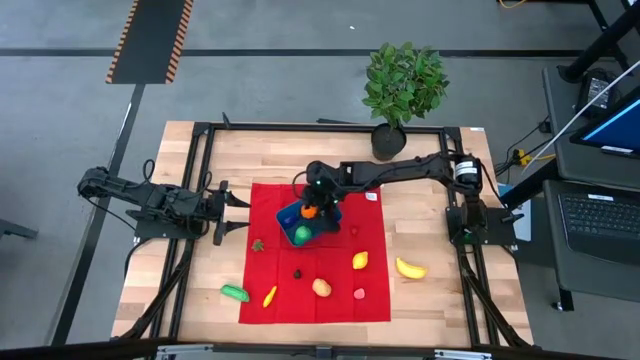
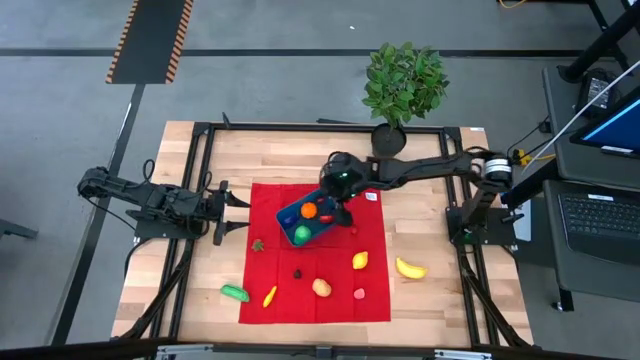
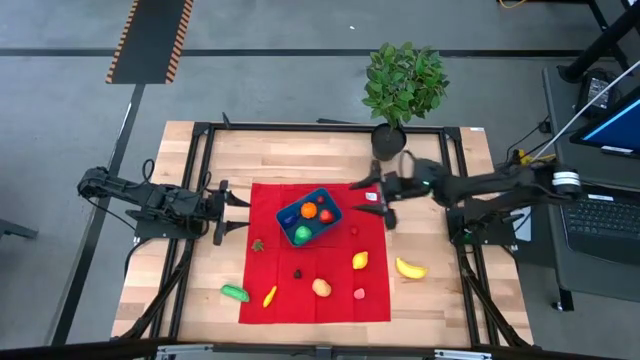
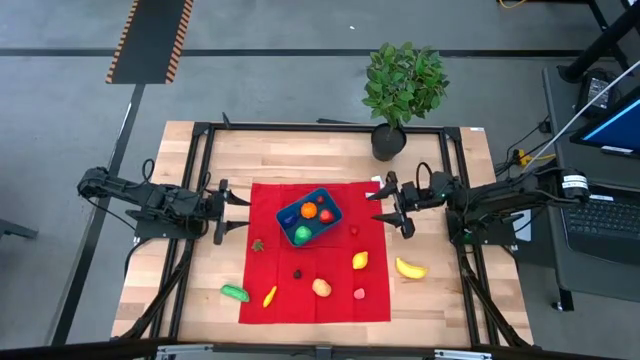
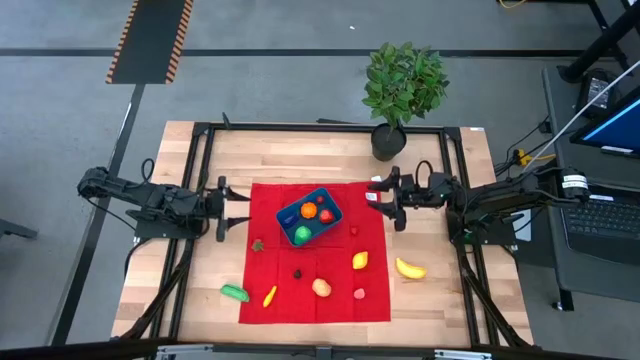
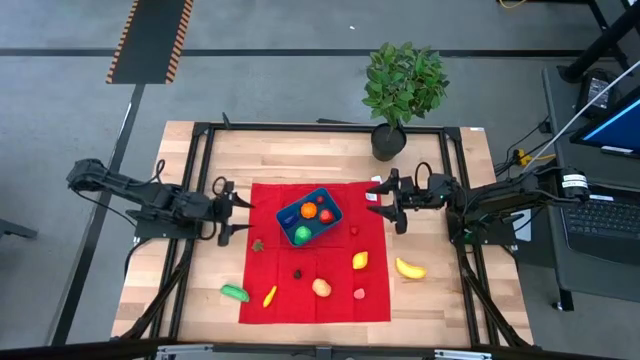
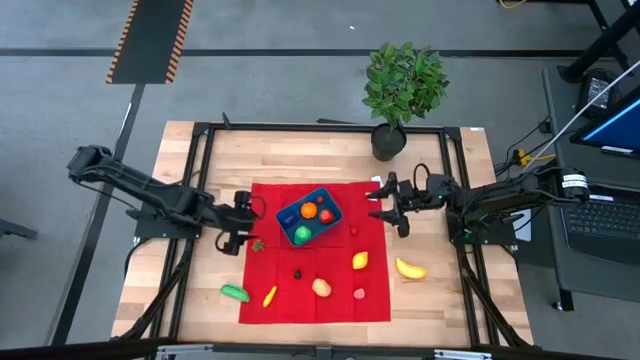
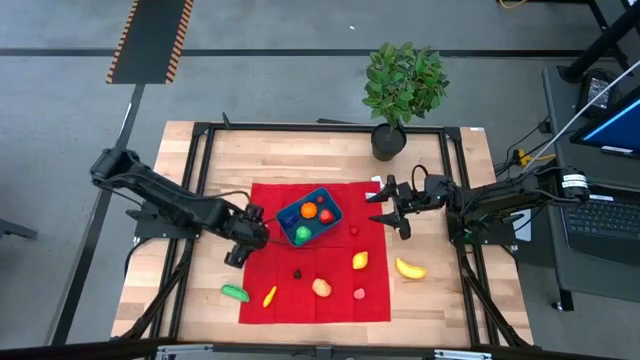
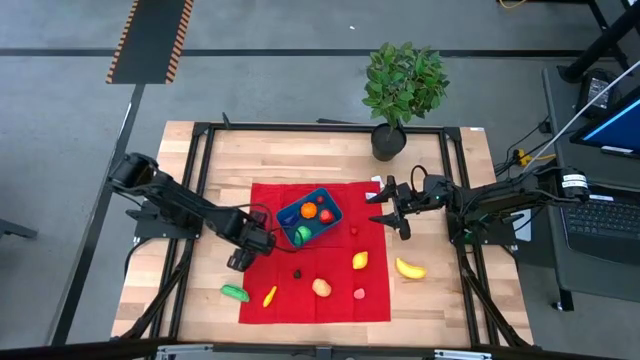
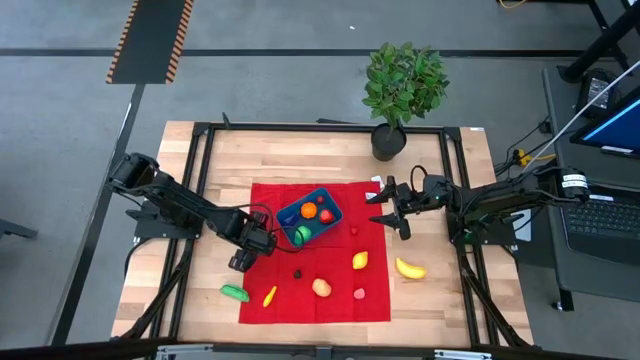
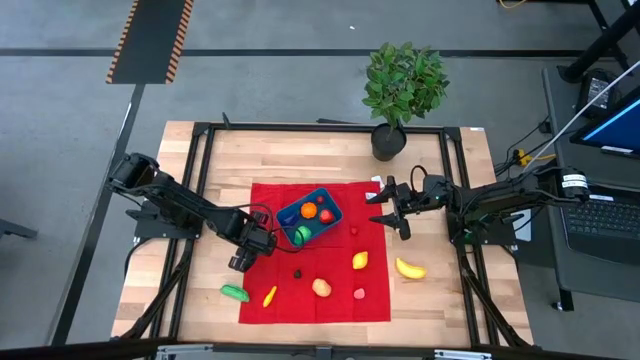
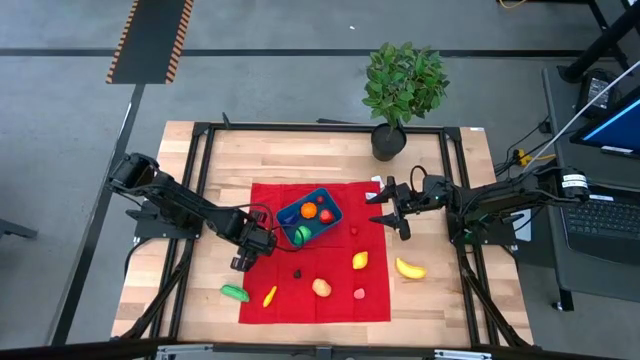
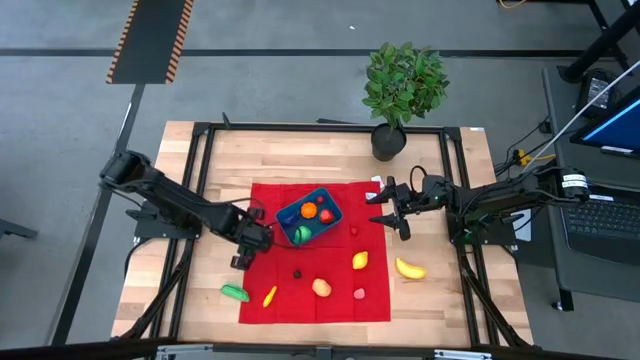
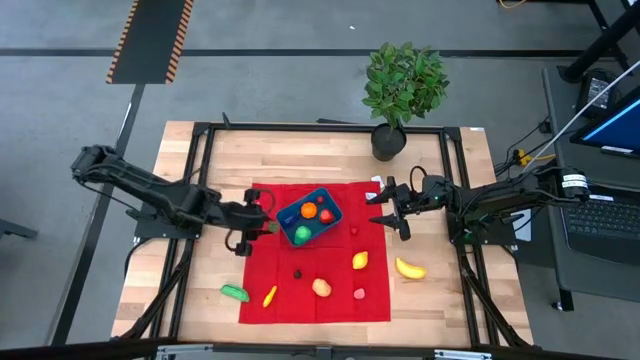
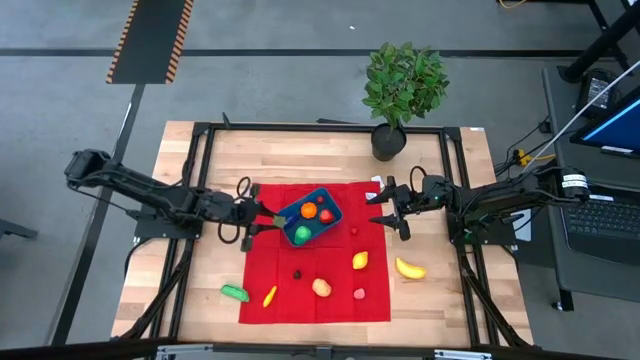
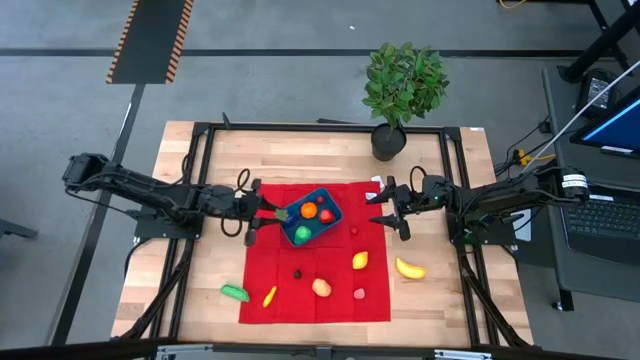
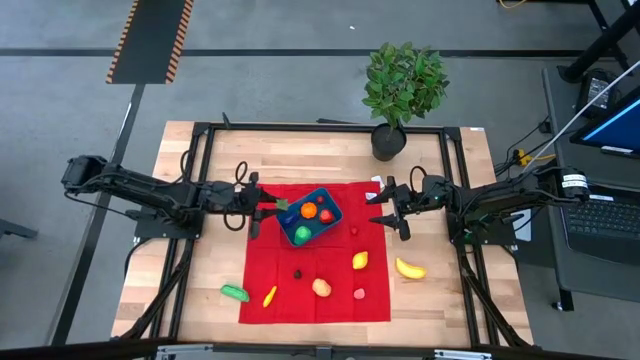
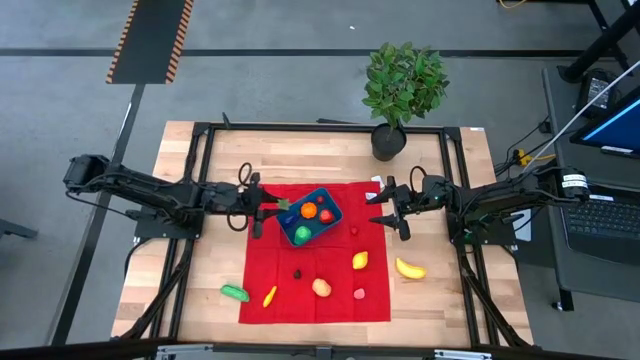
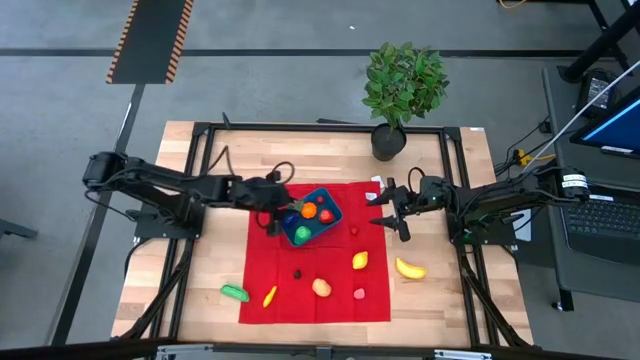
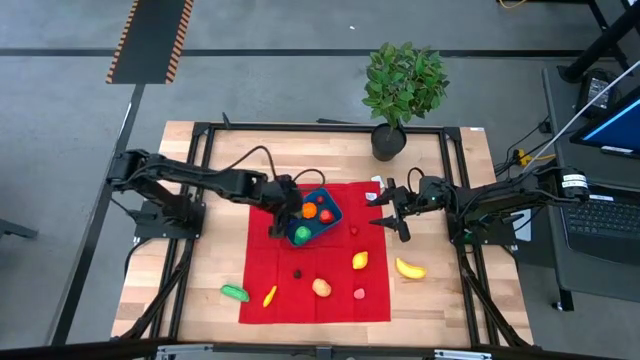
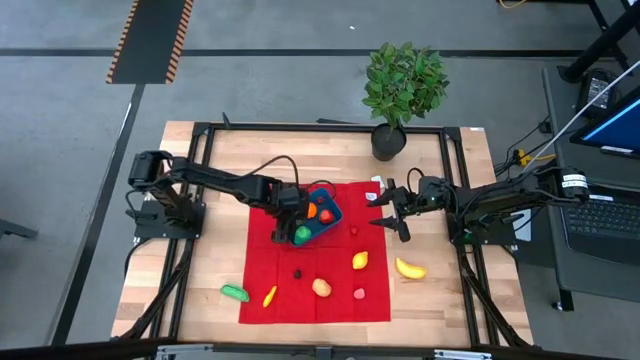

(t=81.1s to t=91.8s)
Task: Pick and placing Produce into tupperware
Put the strawberry into the blue bin

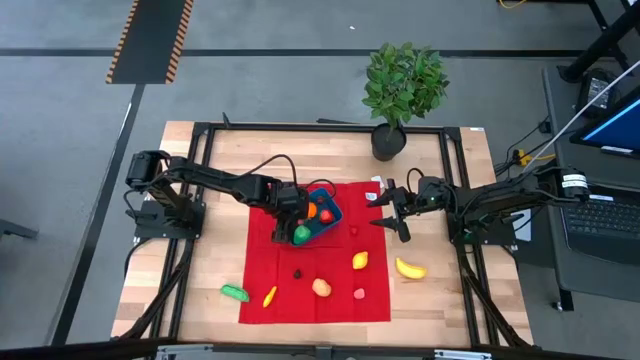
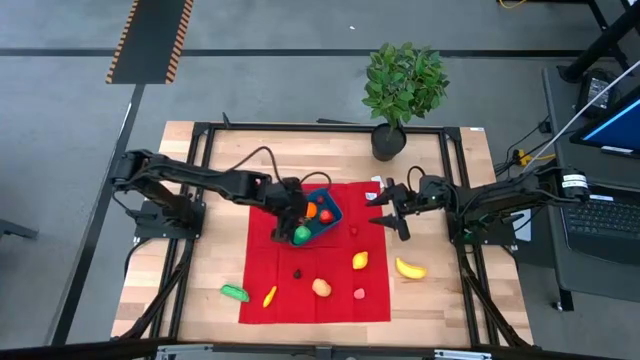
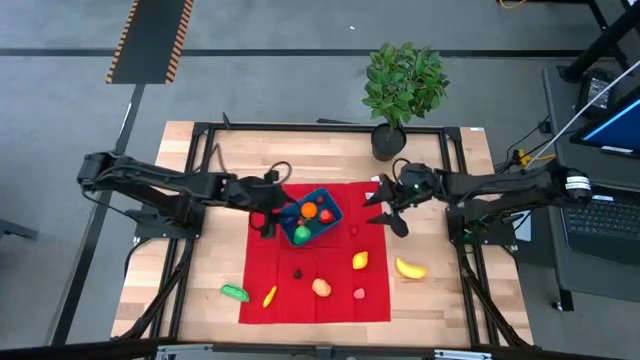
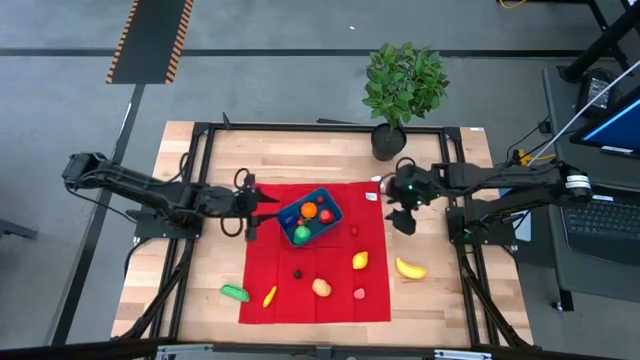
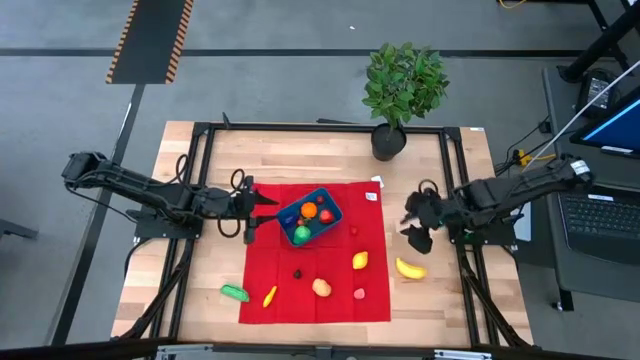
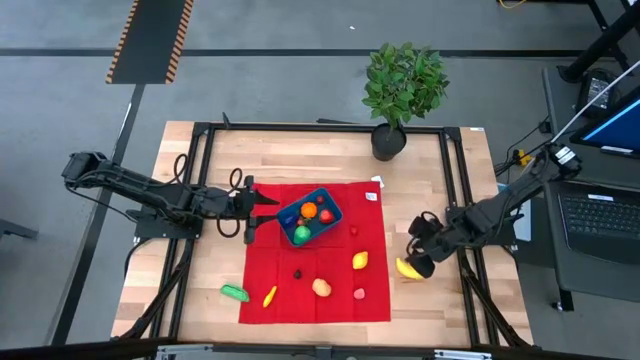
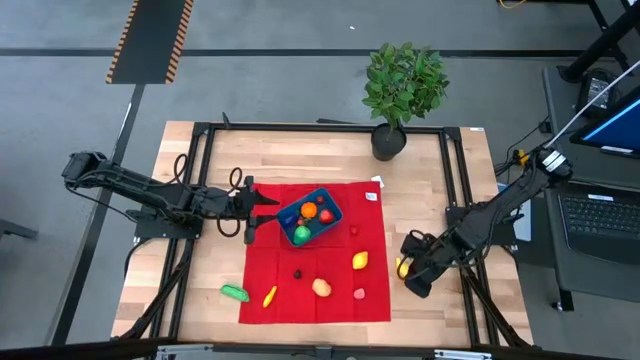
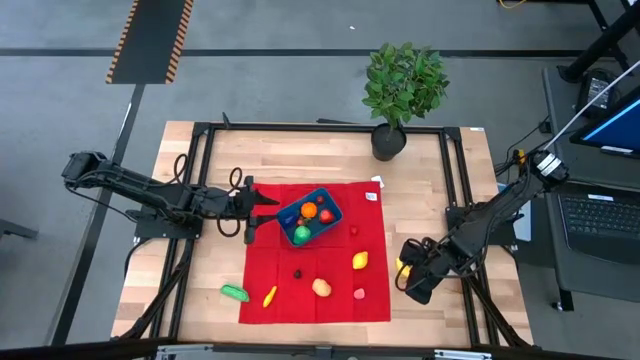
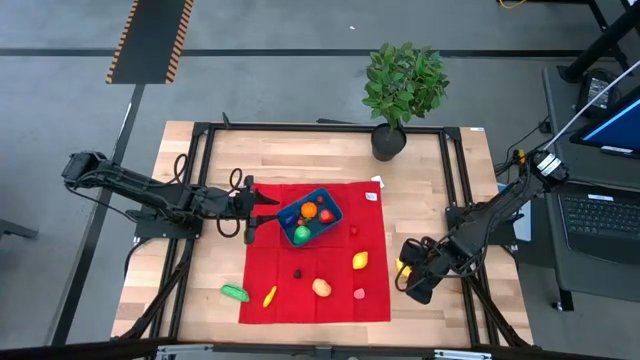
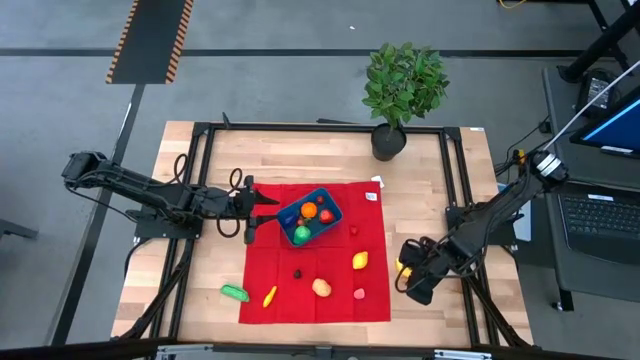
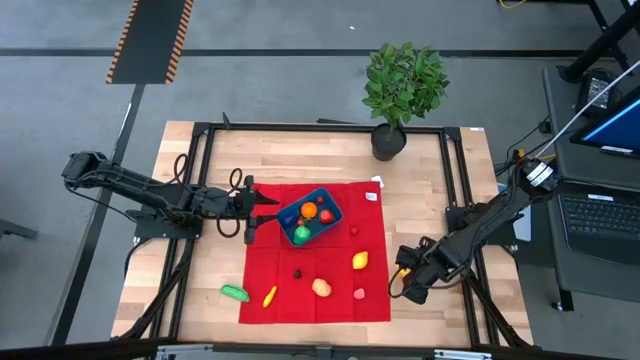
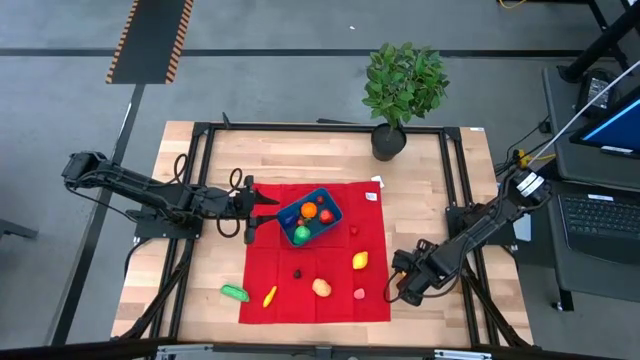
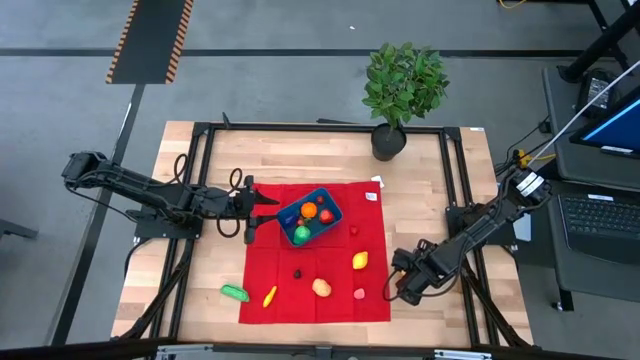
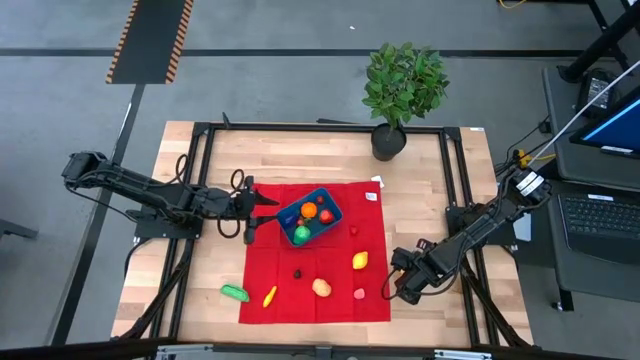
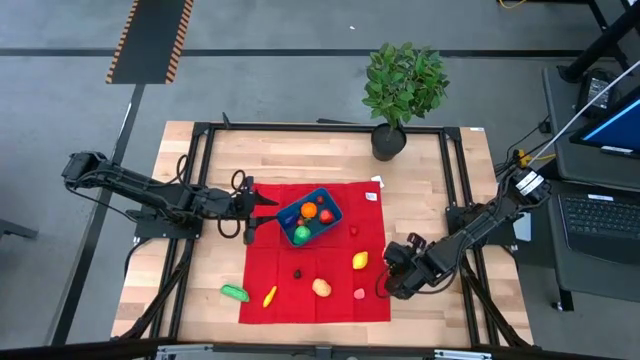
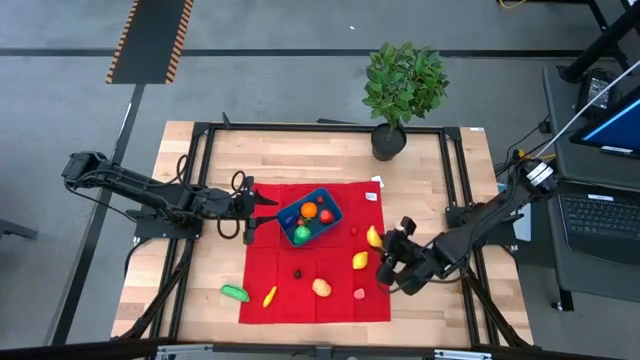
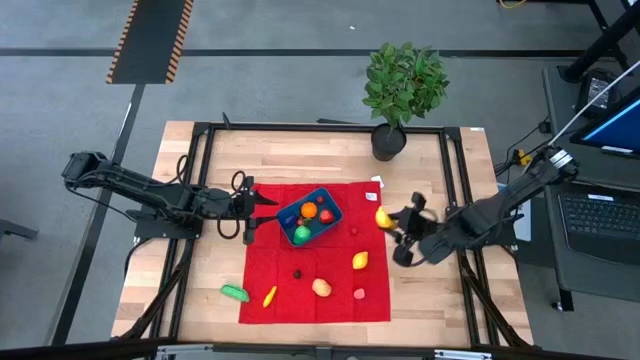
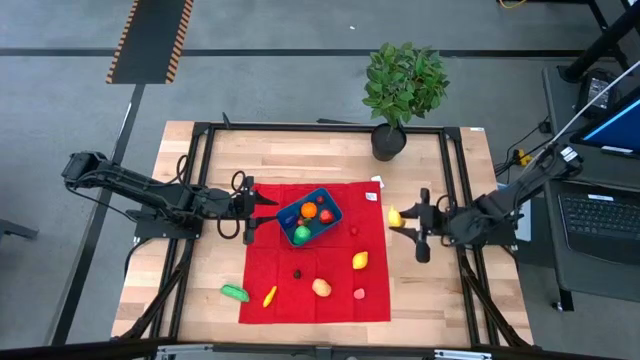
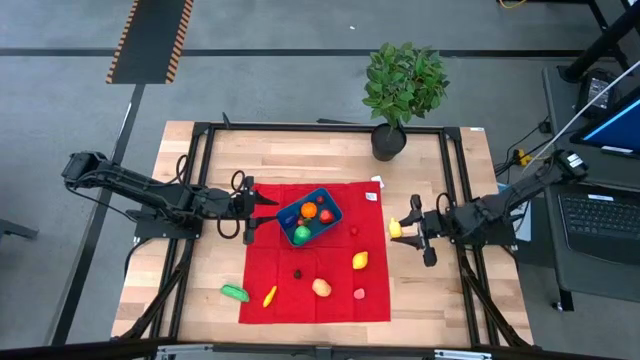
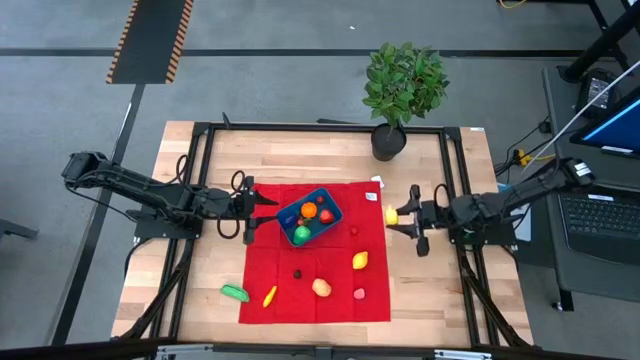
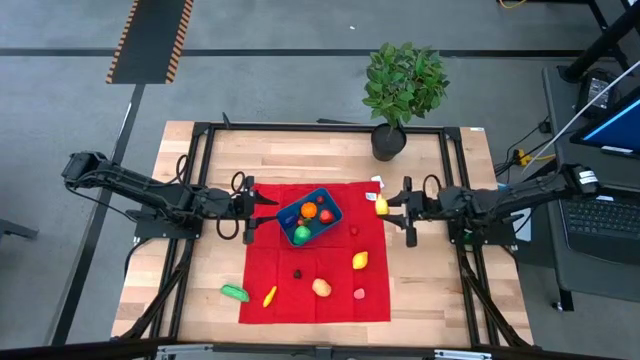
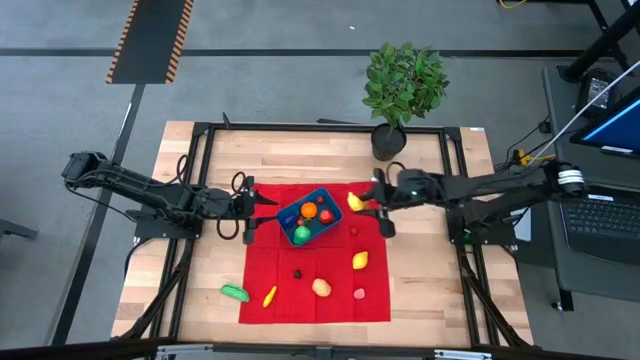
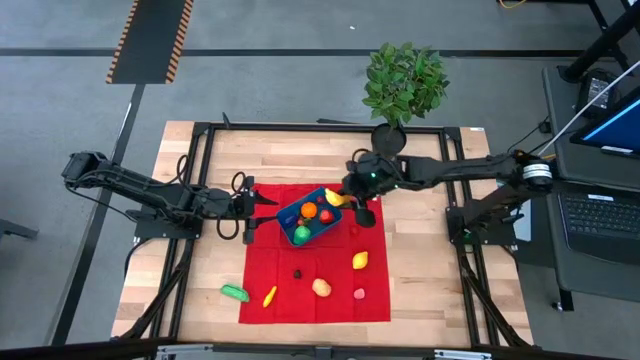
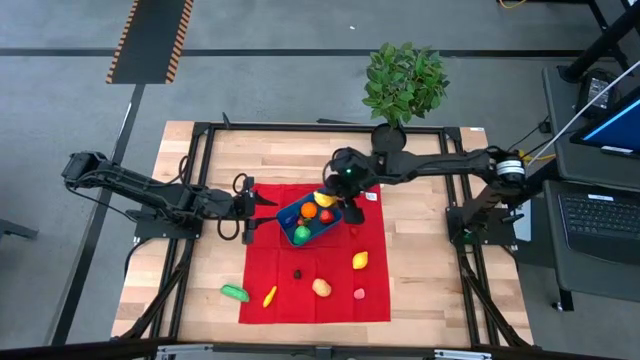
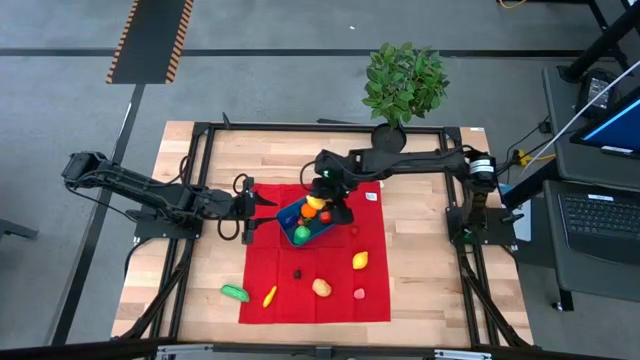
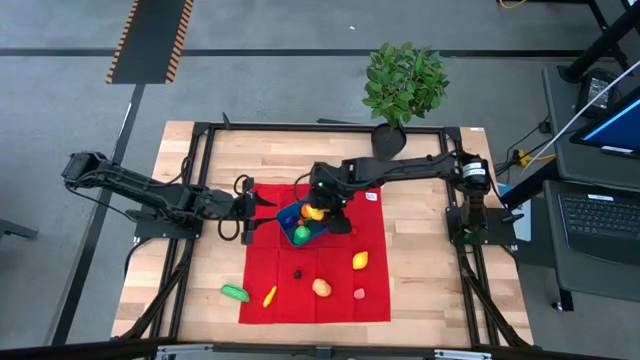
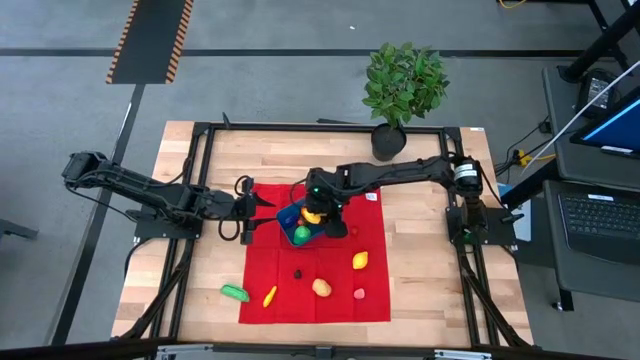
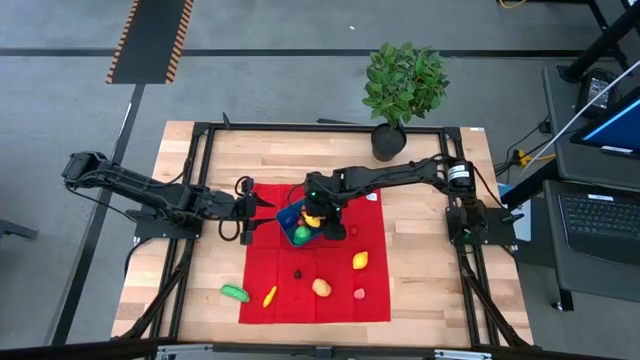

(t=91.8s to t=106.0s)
Put the banana into the blue bin
